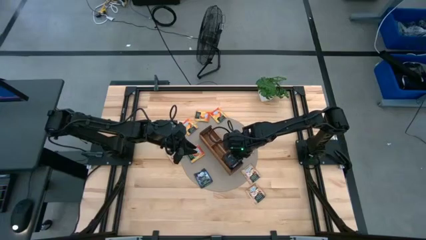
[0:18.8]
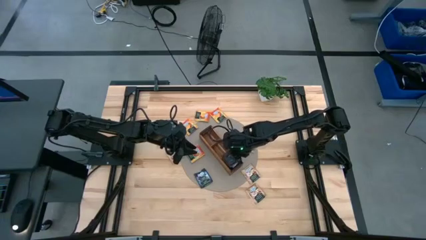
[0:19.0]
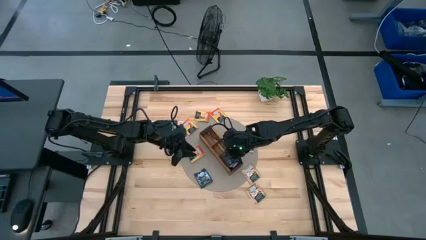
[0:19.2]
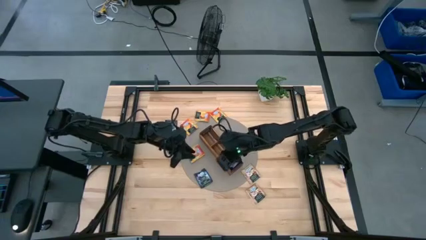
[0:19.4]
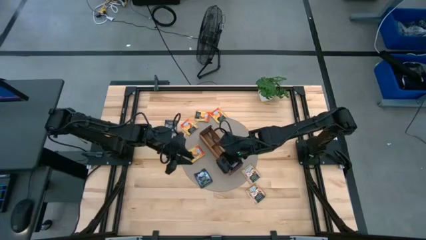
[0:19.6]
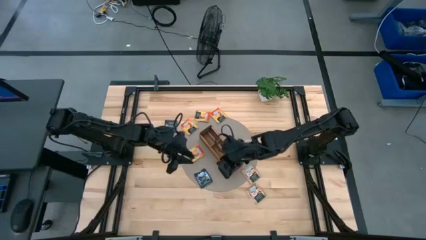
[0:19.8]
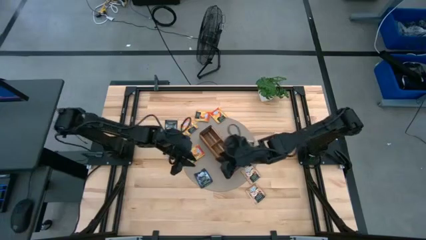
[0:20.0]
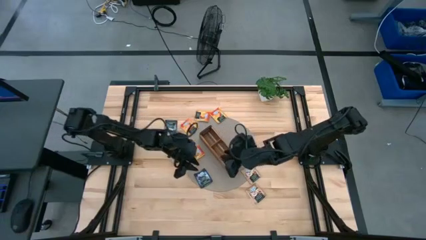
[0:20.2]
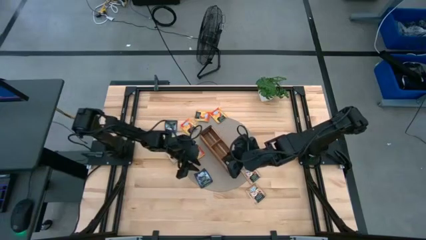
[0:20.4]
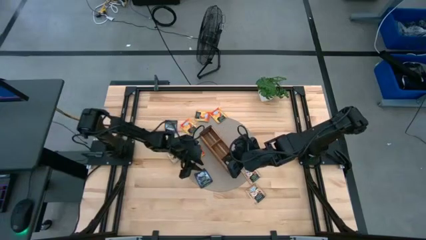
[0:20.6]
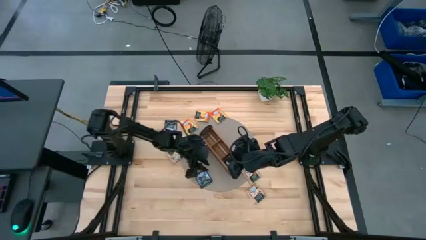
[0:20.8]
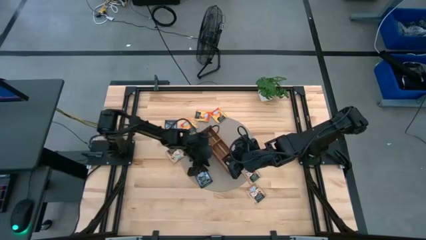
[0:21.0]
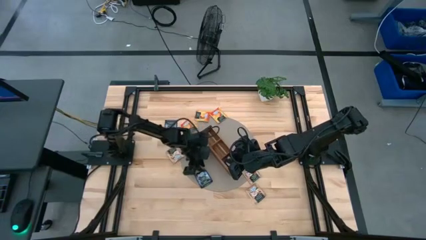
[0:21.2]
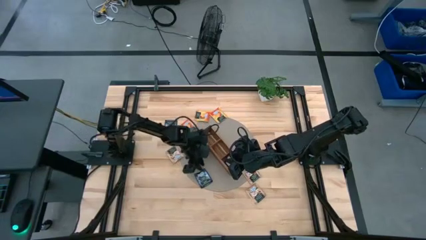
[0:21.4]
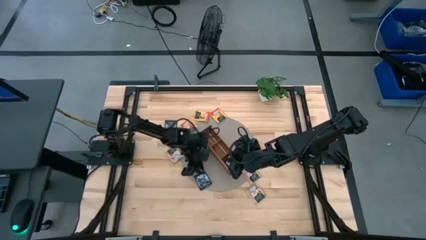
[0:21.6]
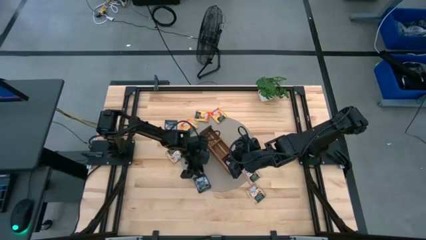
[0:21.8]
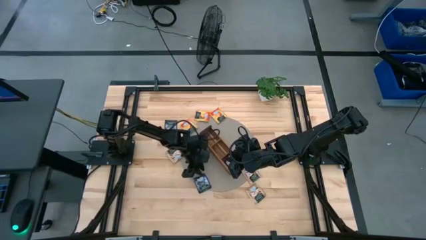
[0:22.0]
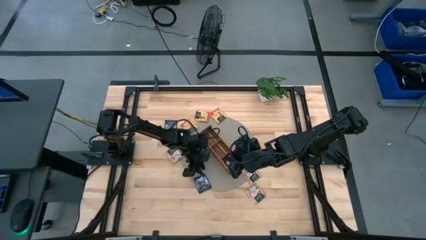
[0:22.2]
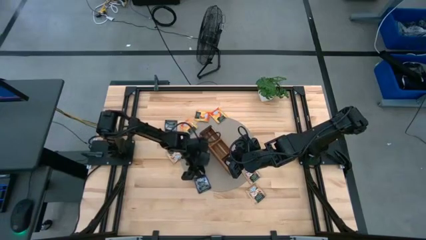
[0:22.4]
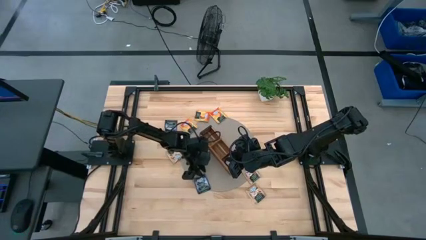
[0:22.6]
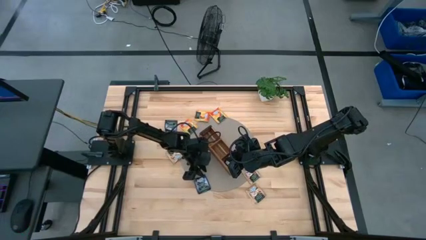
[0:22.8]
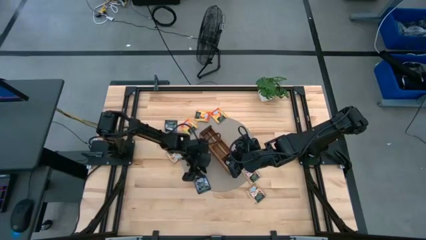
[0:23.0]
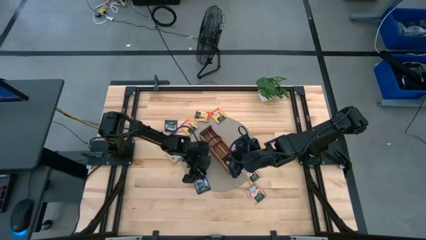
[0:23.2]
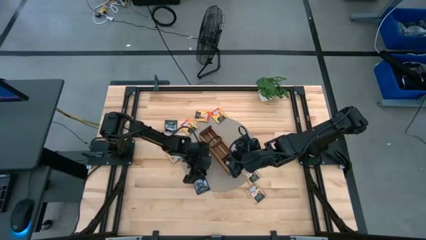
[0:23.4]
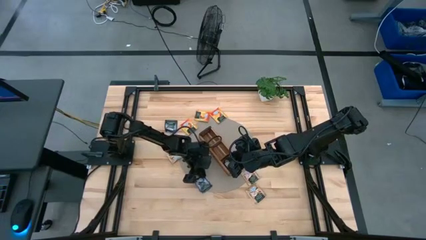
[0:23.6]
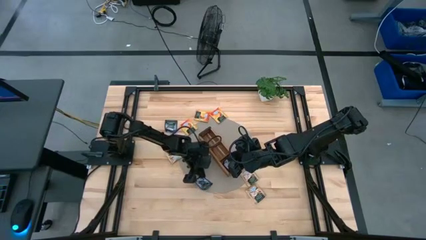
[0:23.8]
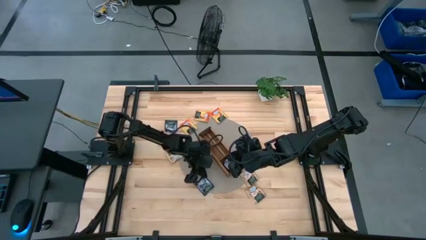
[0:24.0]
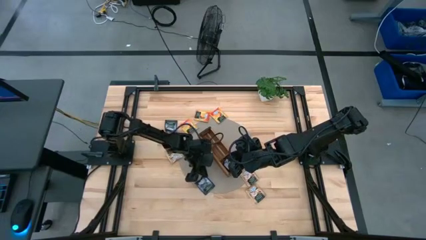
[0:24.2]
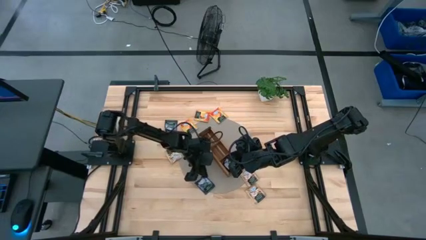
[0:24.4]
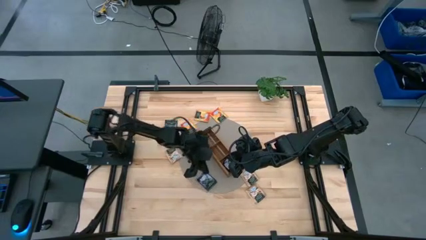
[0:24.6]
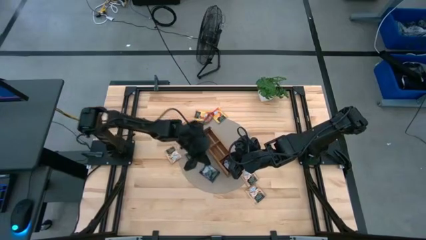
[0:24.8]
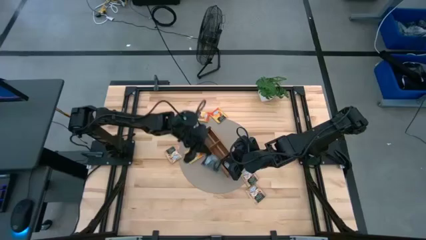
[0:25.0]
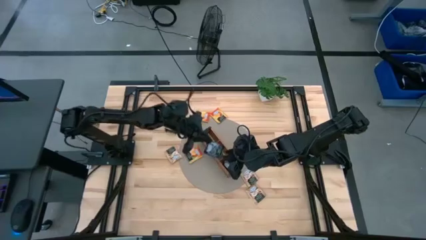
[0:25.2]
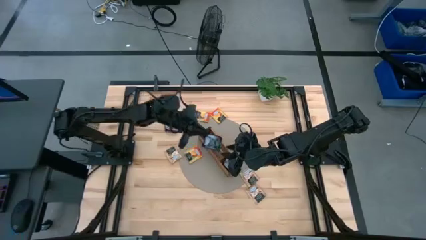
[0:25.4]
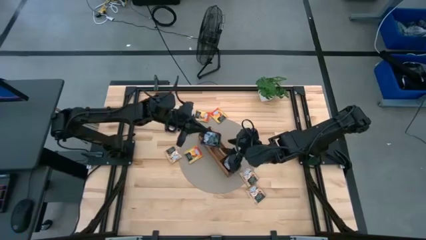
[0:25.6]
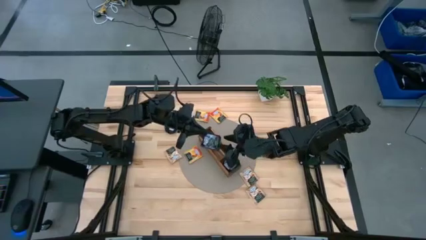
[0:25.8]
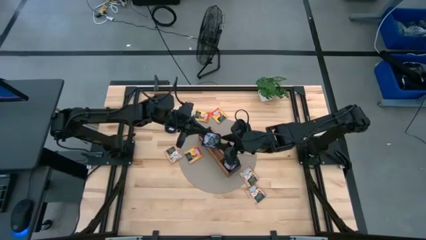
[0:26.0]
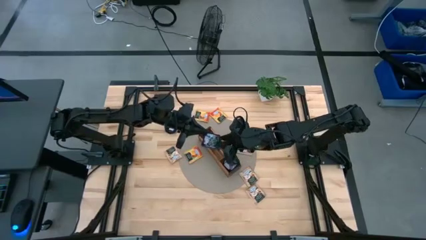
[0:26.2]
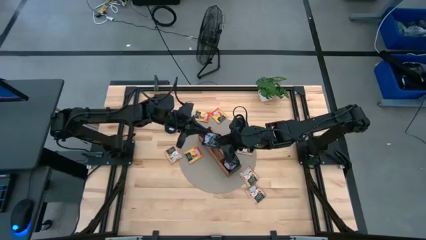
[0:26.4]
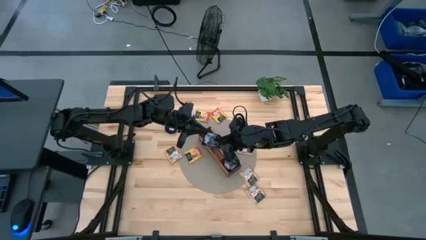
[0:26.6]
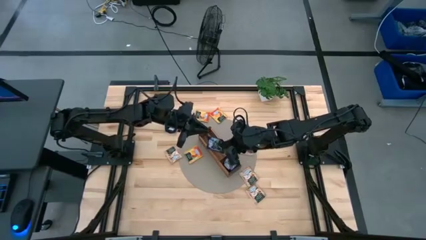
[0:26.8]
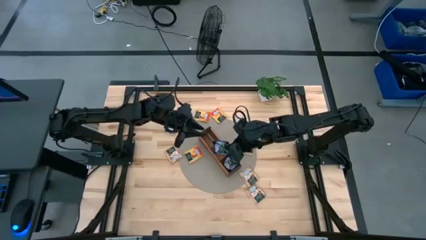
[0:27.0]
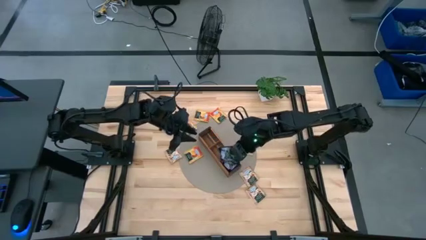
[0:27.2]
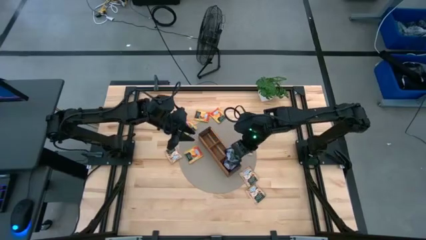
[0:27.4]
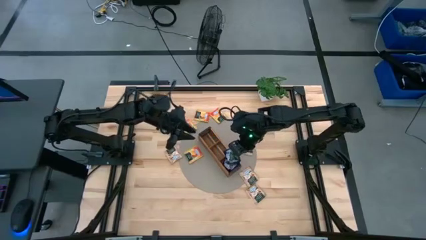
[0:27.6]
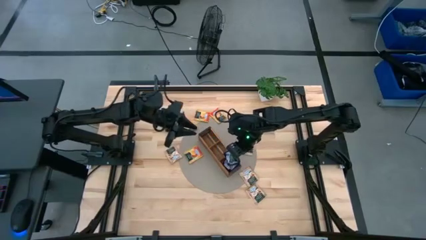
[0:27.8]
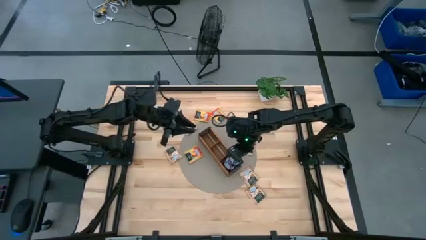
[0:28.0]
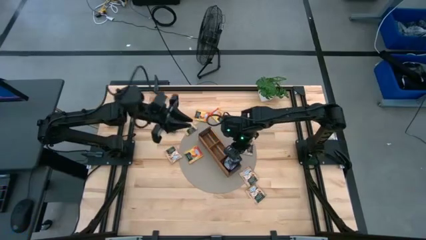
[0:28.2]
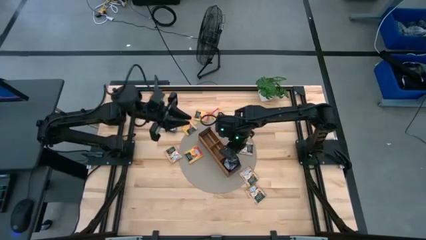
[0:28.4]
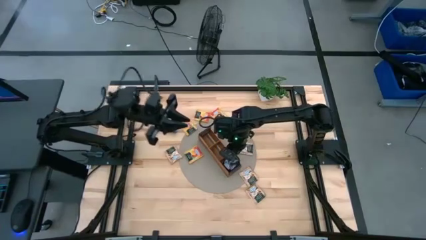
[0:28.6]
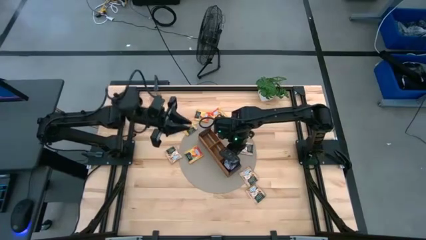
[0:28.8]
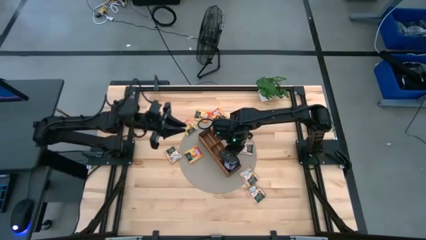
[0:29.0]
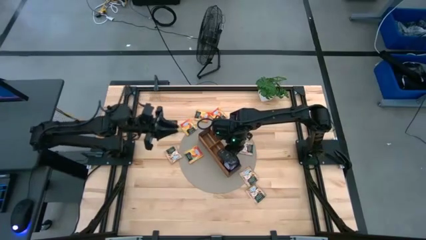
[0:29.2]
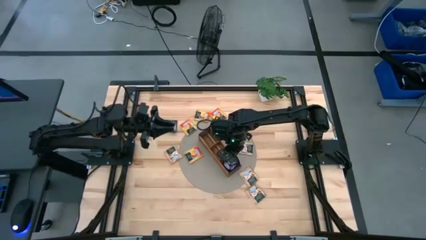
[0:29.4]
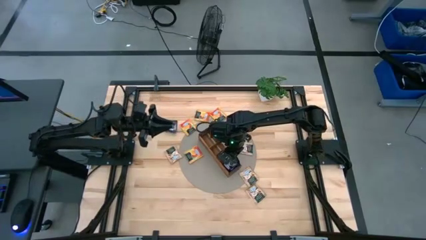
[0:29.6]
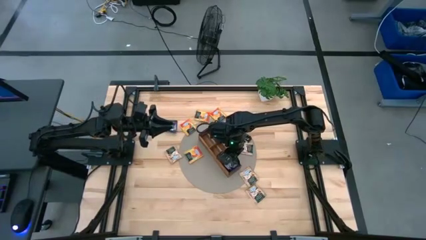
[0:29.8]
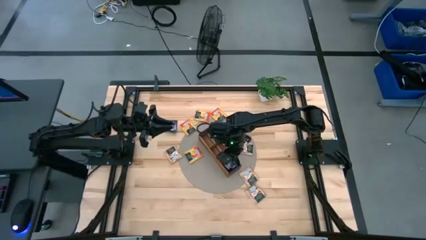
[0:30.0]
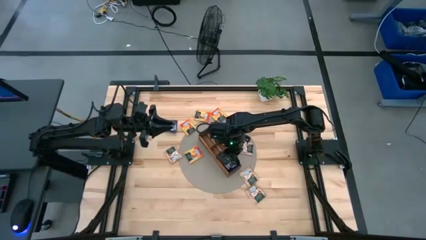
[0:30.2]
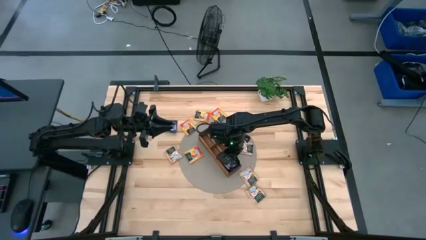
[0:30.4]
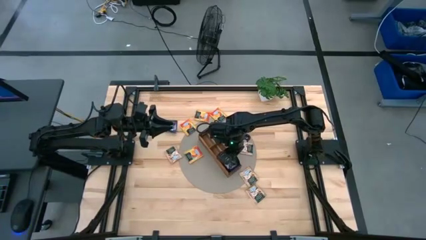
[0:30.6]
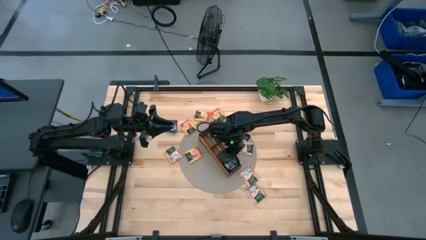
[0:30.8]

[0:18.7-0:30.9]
Task: Pick & Place Tea
Put the purple tea bag into the right section of the wooden organizer

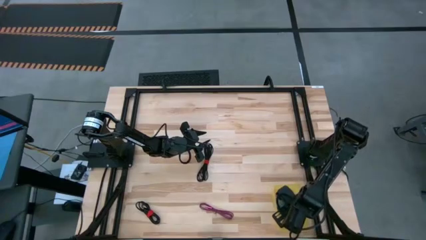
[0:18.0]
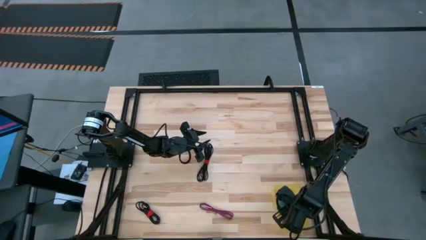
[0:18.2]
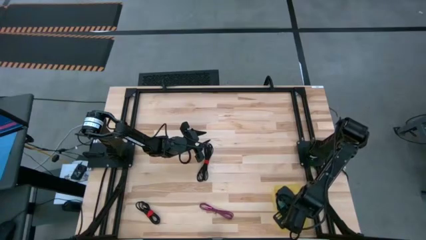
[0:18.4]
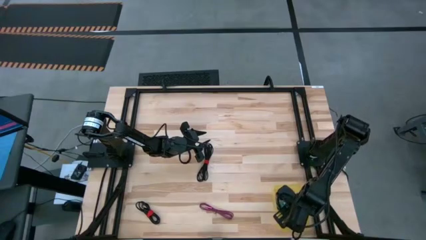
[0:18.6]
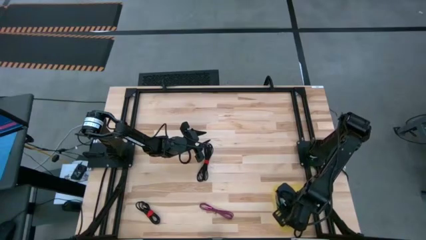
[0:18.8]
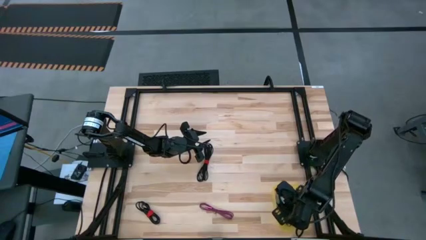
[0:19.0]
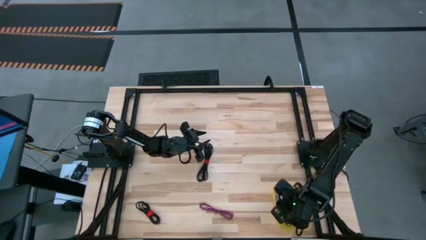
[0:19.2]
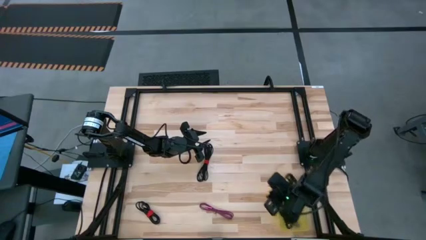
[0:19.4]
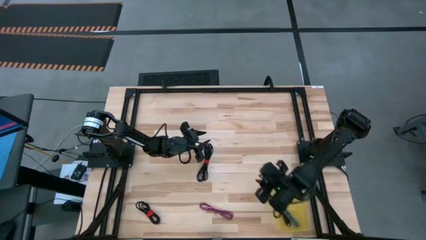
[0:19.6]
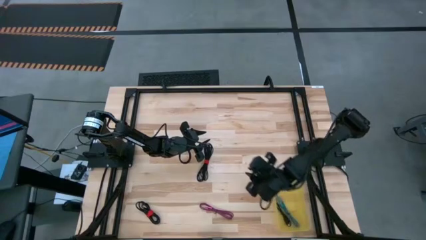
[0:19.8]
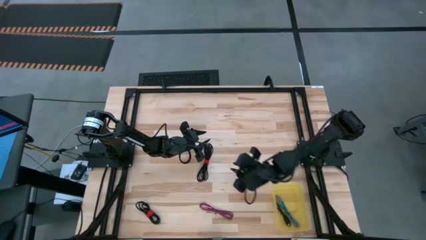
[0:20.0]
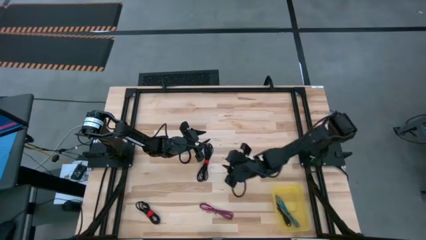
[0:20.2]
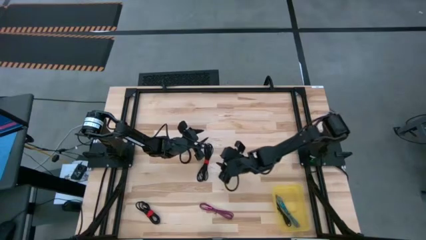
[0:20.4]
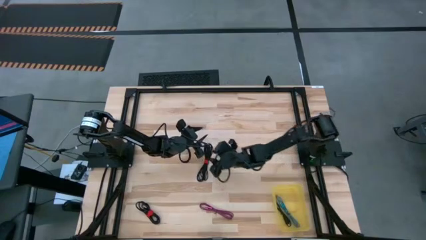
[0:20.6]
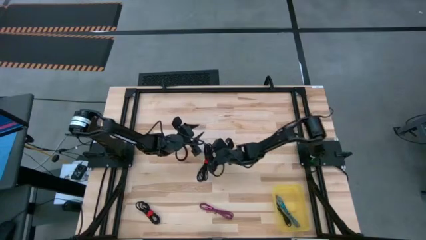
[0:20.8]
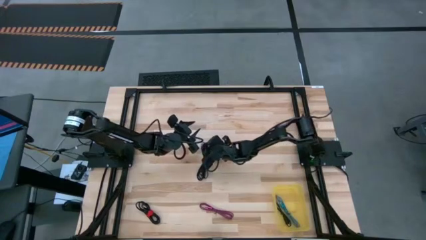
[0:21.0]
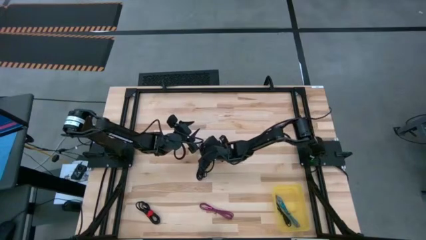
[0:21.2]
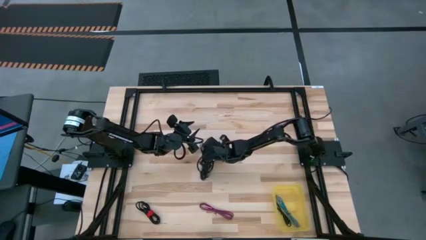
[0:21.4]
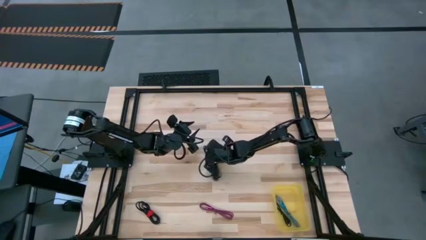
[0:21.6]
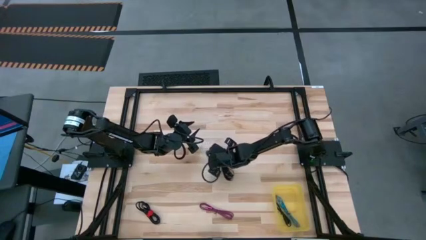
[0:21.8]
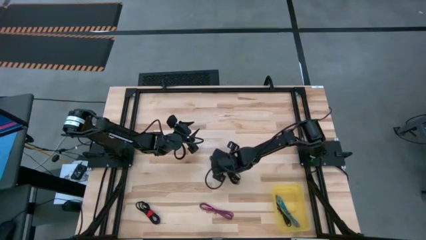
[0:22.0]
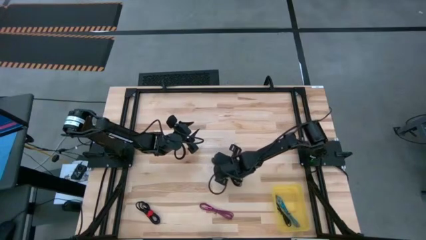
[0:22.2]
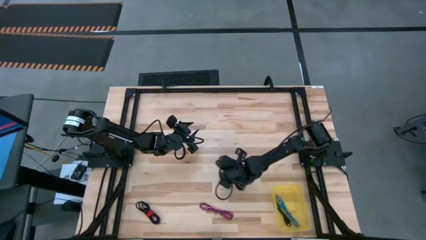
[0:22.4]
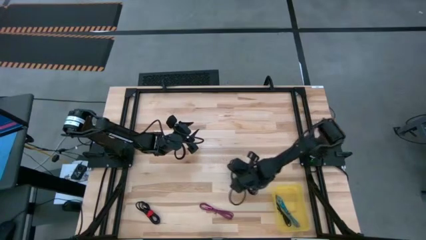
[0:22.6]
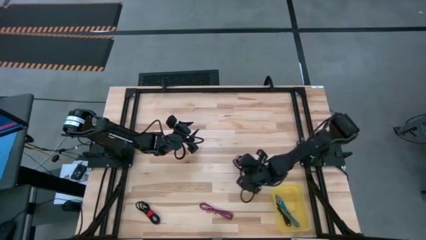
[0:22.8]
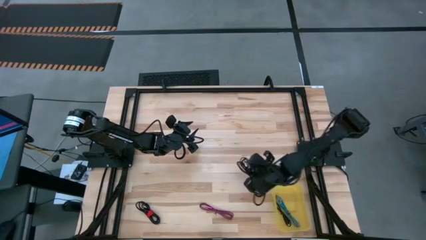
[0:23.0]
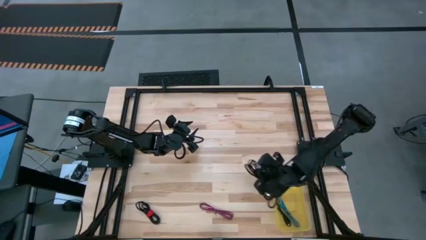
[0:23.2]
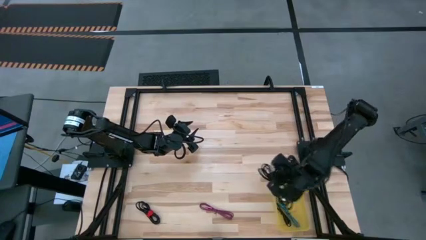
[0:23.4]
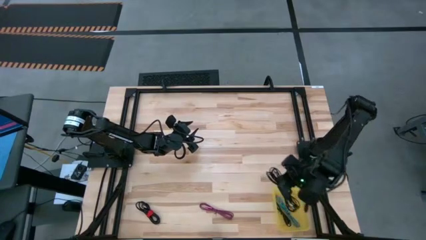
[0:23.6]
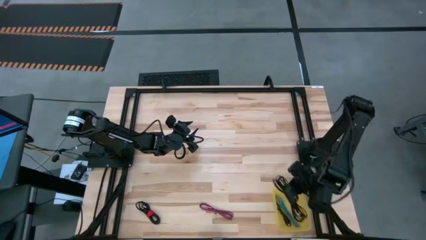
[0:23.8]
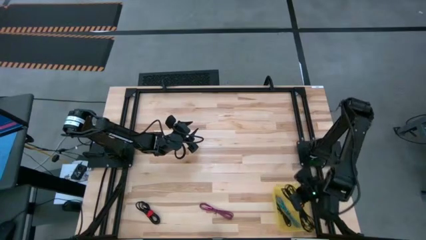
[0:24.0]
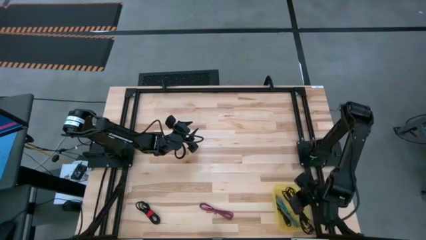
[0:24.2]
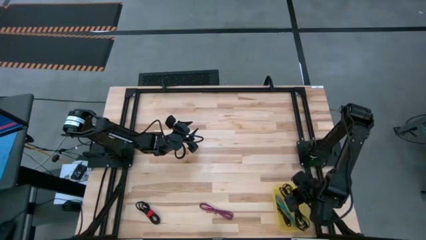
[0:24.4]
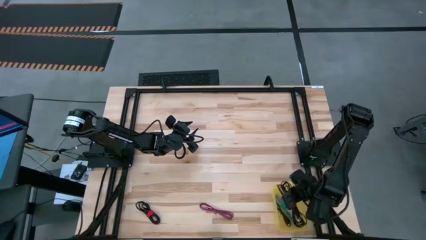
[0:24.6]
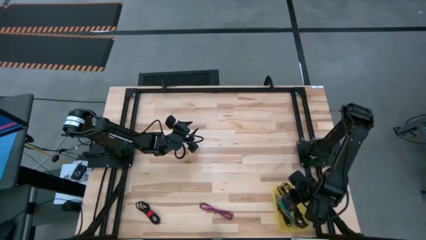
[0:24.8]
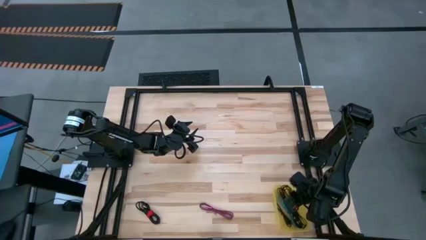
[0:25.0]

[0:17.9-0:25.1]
Task: Pick and place USB-C Cables
Put the top black cable charger into the yellow bin
